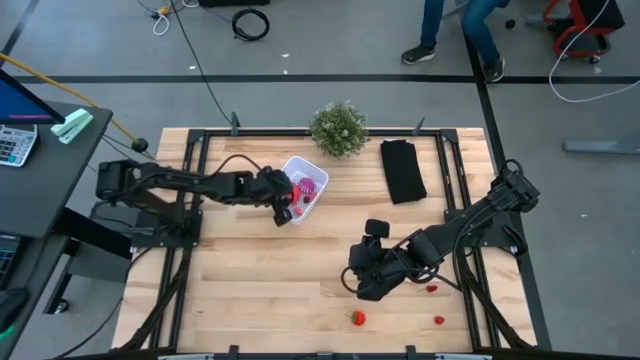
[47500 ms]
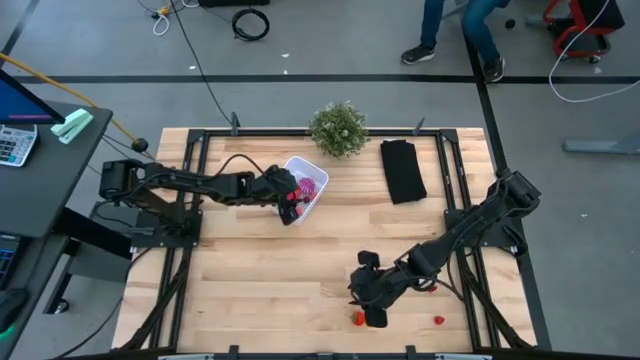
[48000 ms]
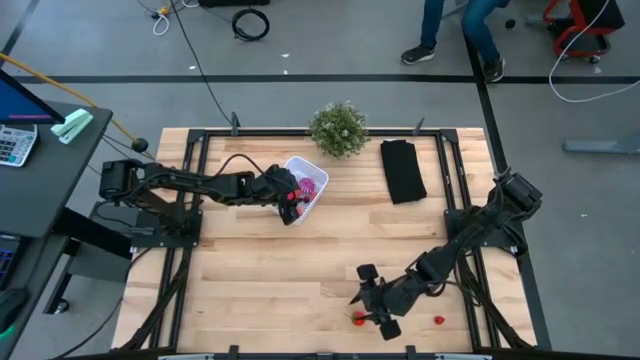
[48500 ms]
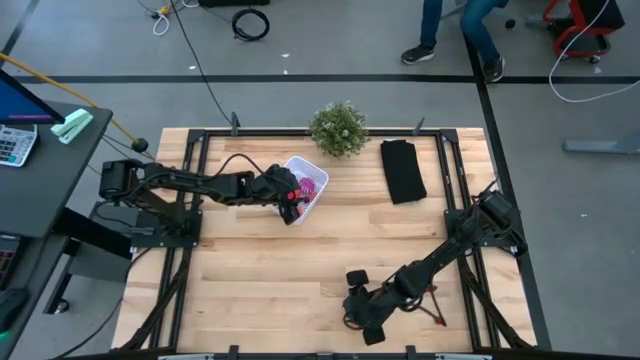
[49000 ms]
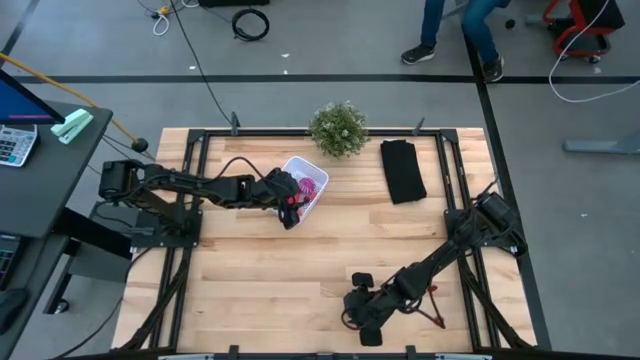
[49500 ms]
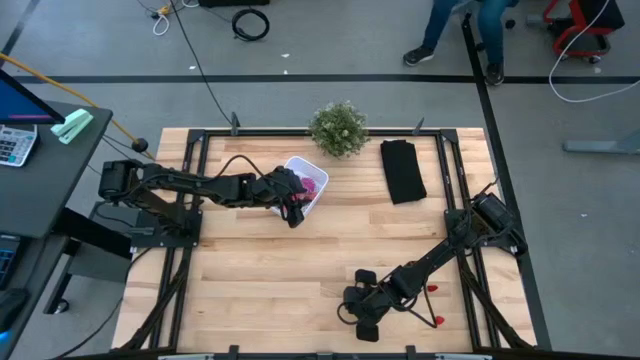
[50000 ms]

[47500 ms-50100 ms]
Task: Pick and placing Produce into tupperware
Put the red strawberry into the white basket

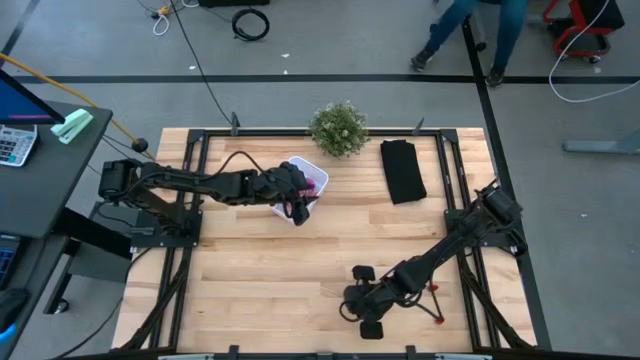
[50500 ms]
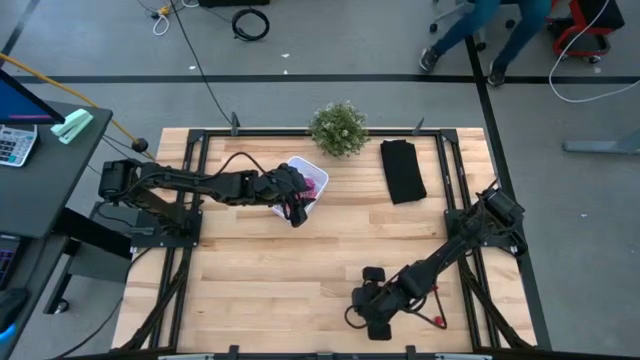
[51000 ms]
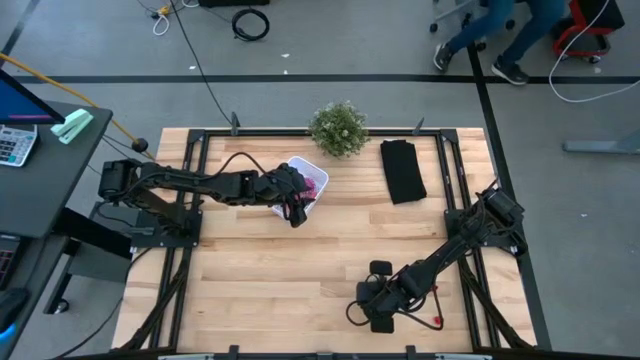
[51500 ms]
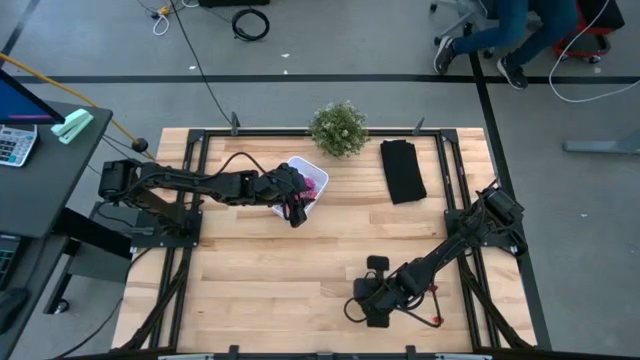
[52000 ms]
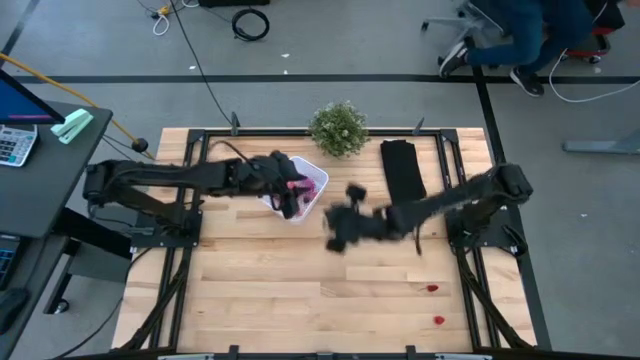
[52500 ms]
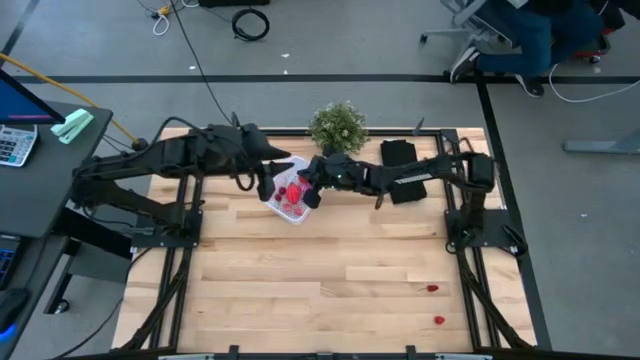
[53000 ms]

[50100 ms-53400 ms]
Put the red strawberry into the white basket

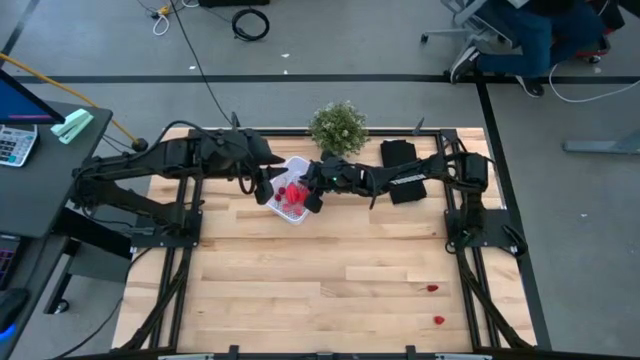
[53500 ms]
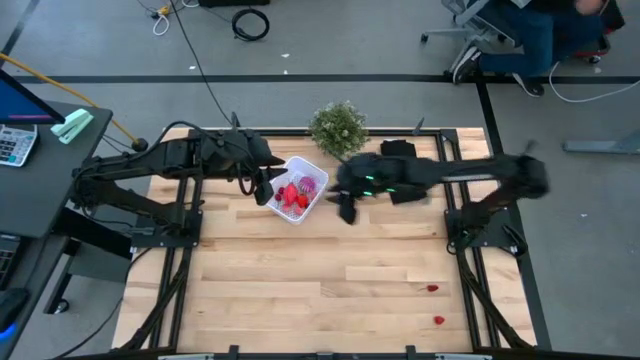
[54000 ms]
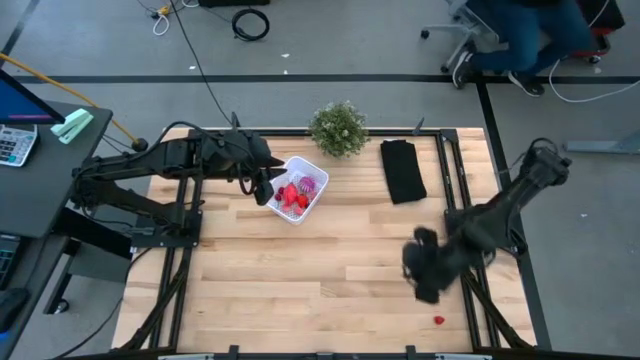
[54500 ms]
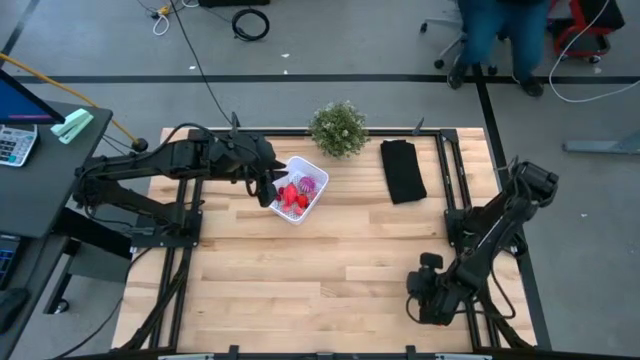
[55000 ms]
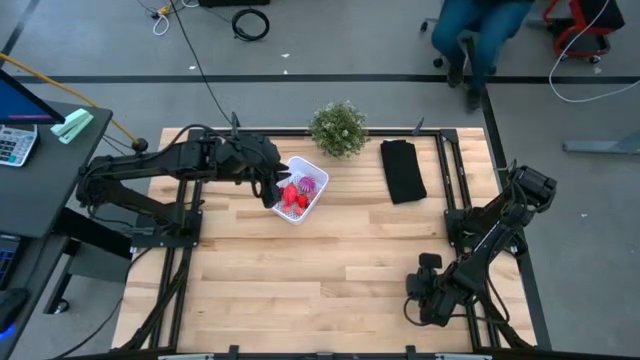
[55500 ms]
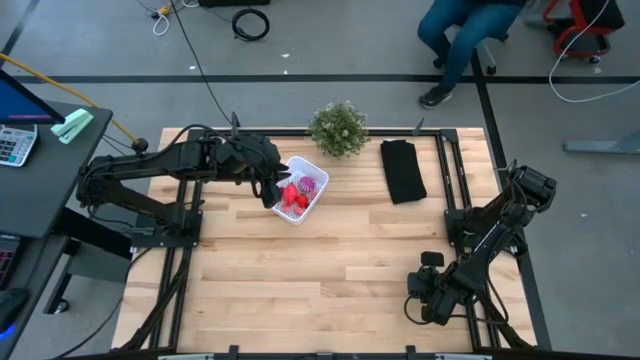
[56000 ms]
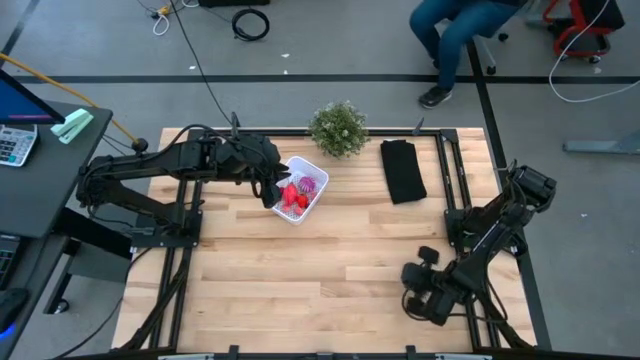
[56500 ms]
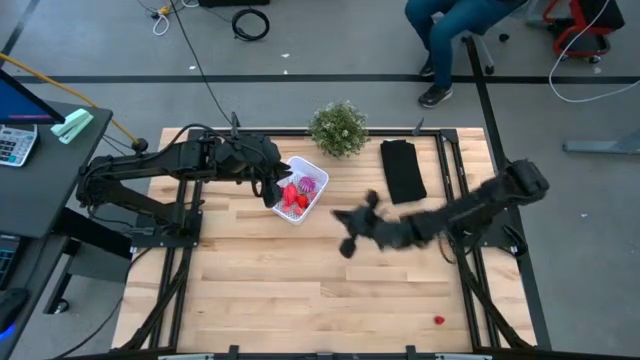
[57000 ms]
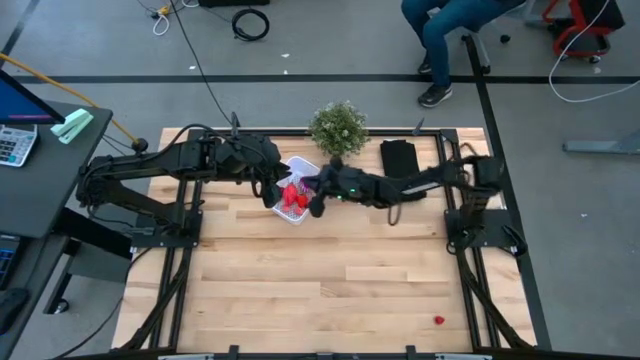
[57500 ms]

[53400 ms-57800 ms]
Put the red cherry into the white basket

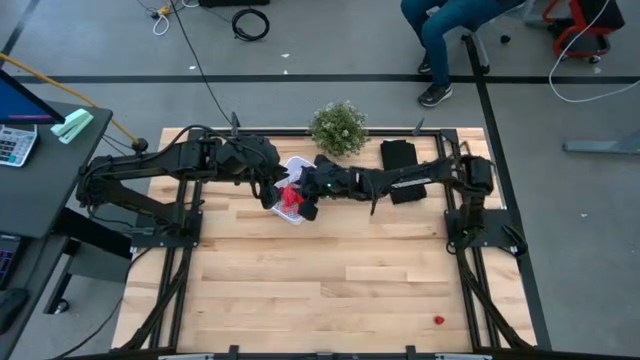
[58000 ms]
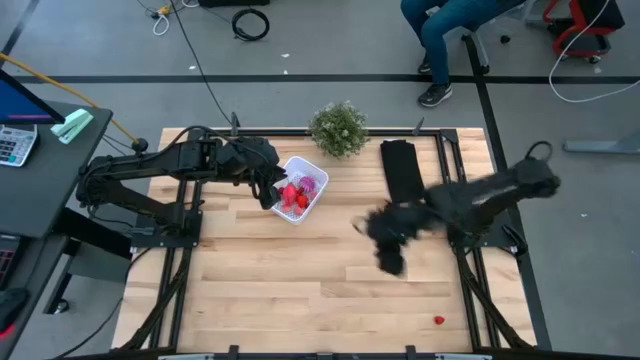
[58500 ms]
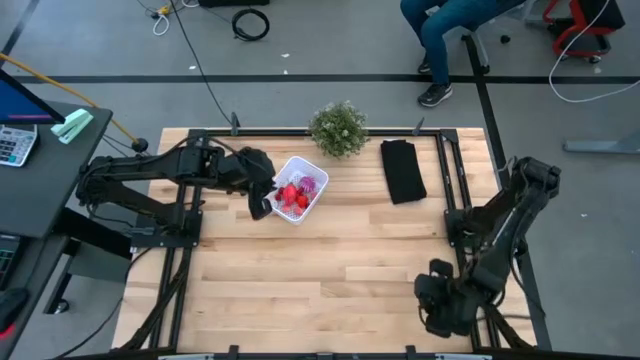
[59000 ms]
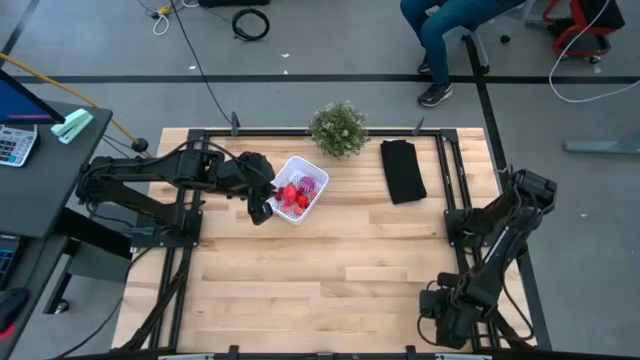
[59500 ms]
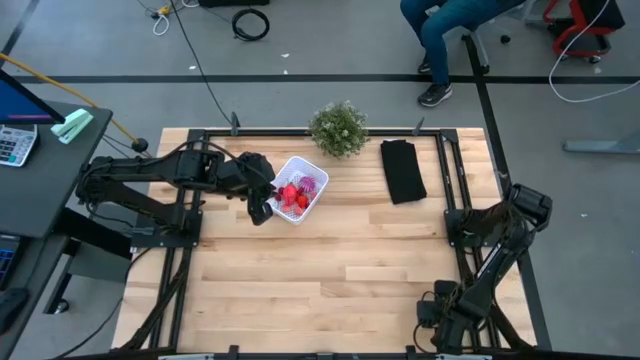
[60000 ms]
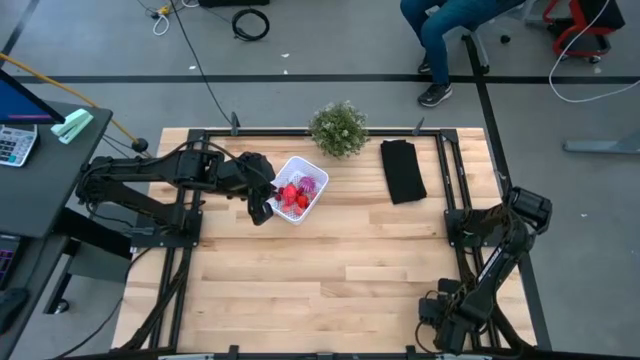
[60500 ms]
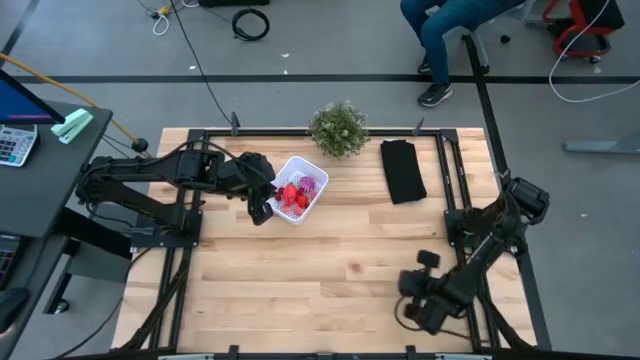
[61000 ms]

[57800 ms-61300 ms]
Put the red raspberry into the white basket

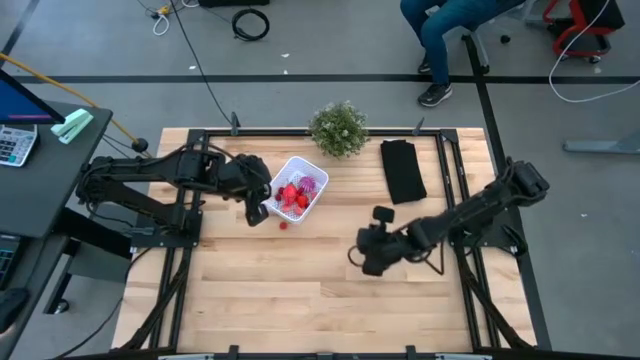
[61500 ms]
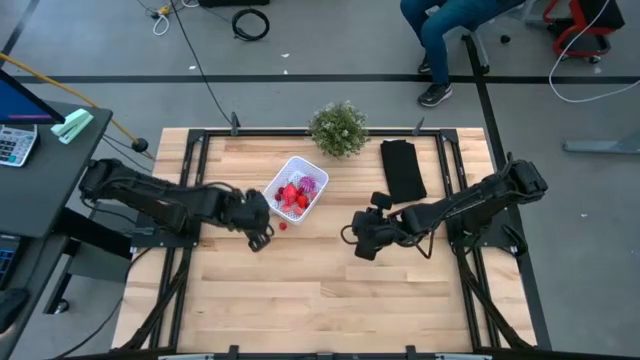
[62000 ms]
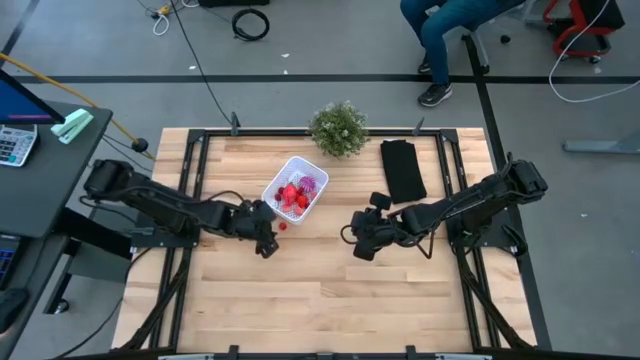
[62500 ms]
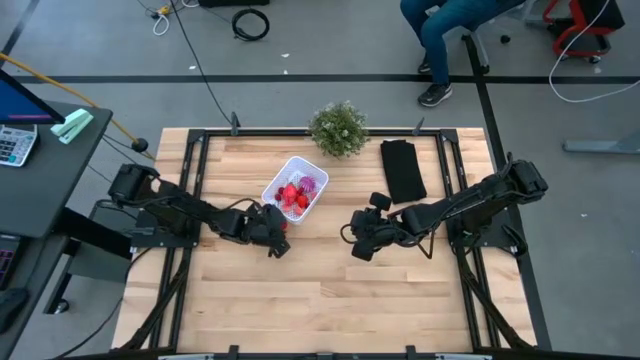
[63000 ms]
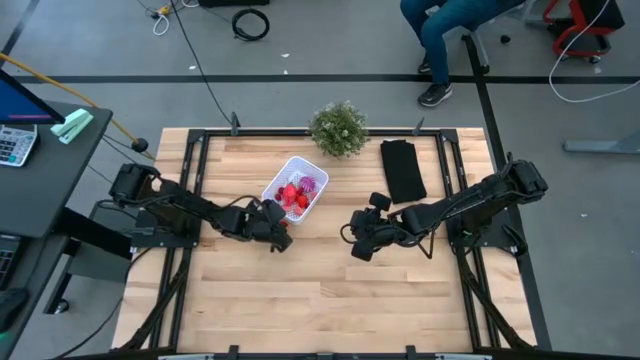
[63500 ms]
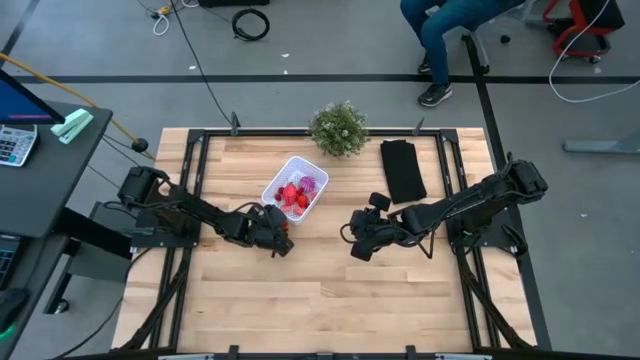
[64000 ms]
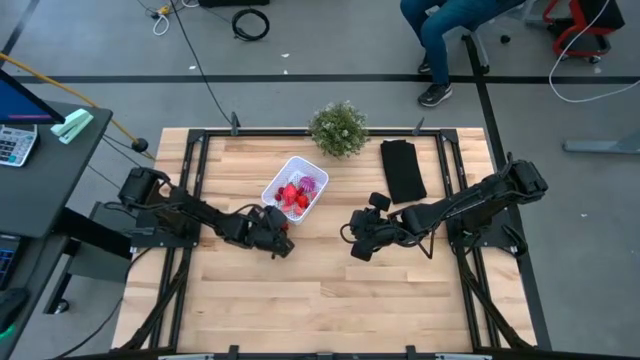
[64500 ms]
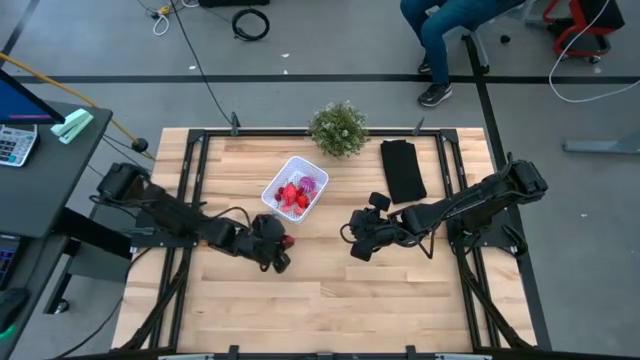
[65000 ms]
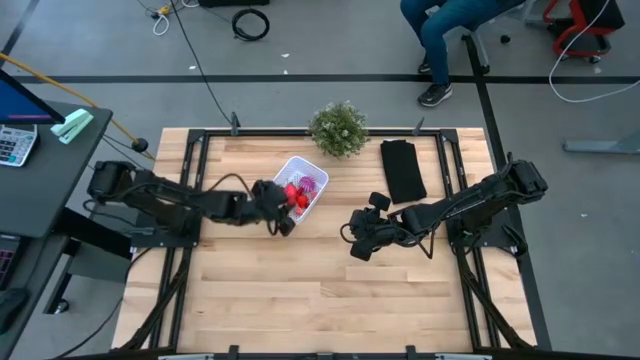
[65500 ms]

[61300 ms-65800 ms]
Put the red raspberry into the white basket

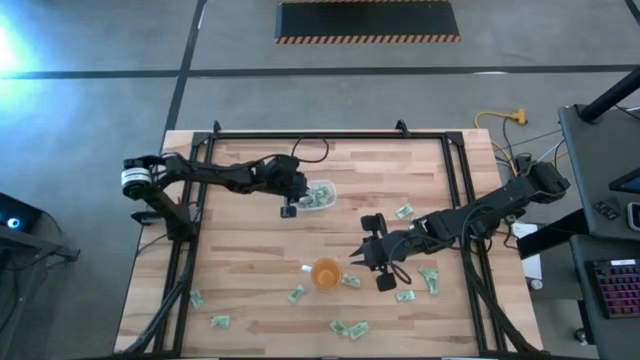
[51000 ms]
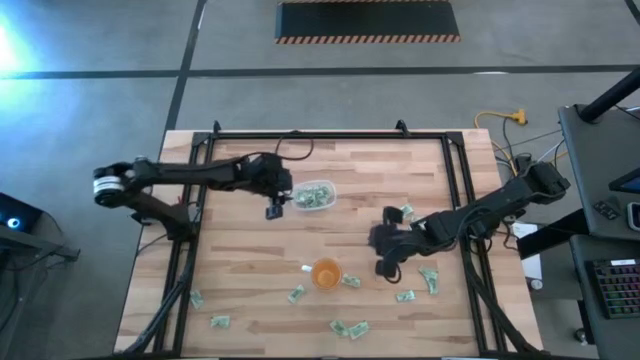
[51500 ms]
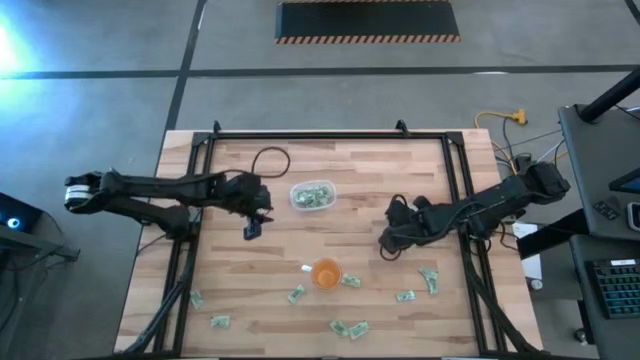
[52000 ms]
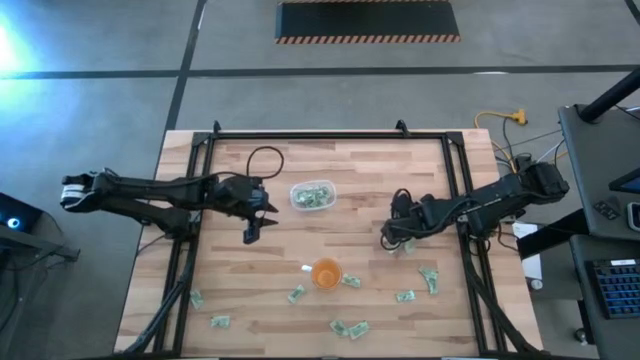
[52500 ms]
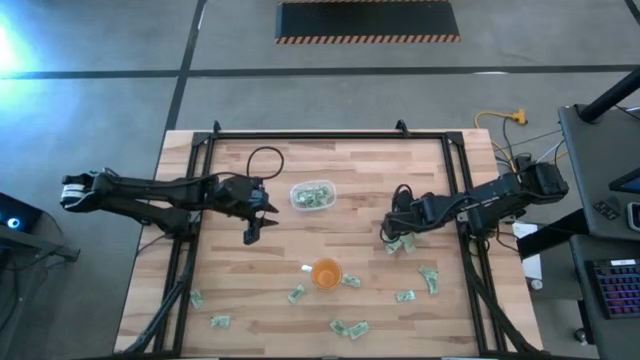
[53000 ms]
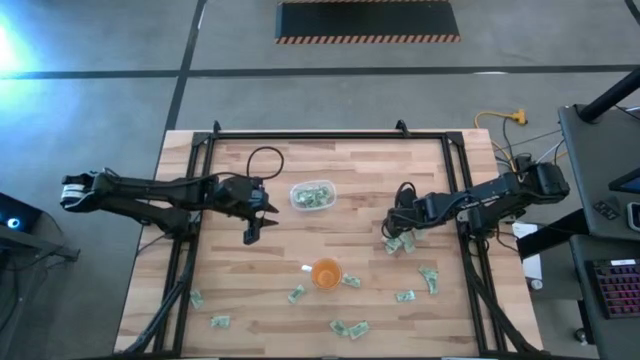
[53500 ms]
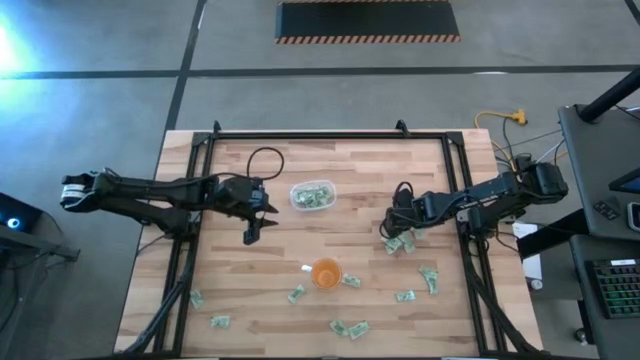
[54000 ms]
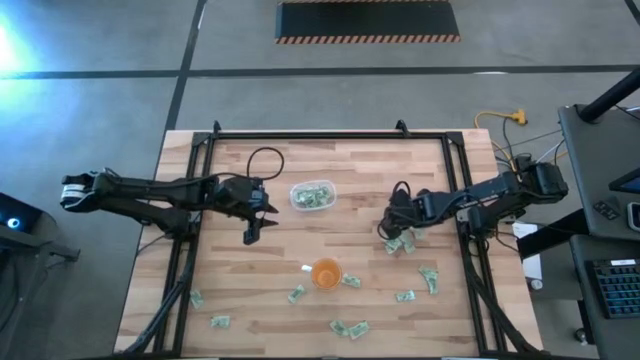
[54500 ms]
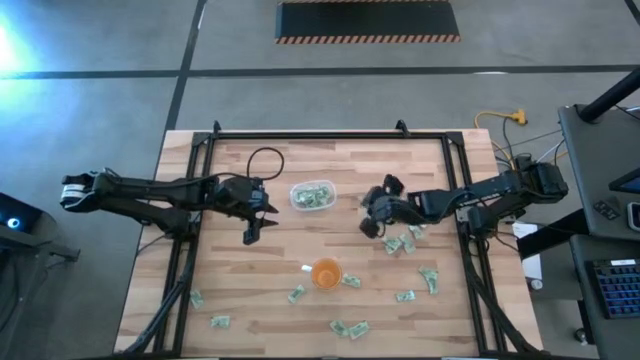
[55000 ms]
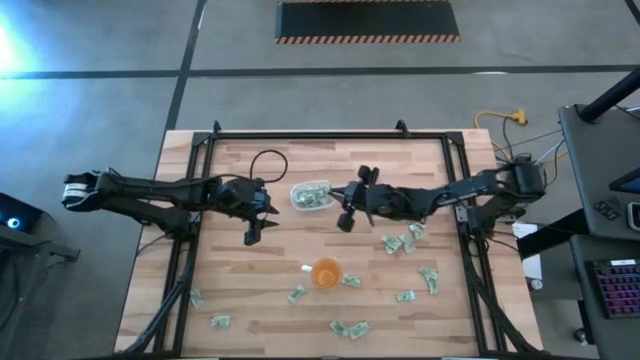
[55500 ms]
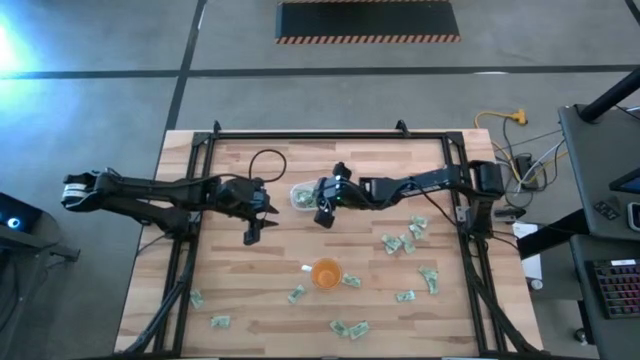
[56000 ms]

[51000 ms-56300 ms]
Task: Pick and place Stevia / Truvia into bins
Put the stevia packet into the transparent bin
